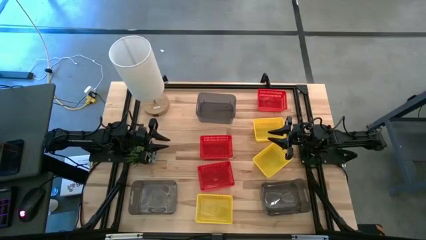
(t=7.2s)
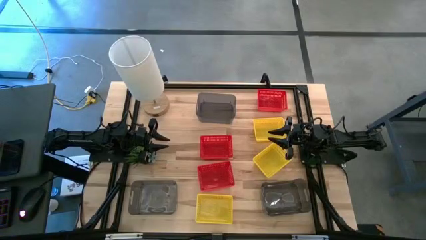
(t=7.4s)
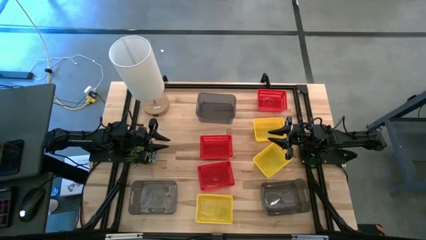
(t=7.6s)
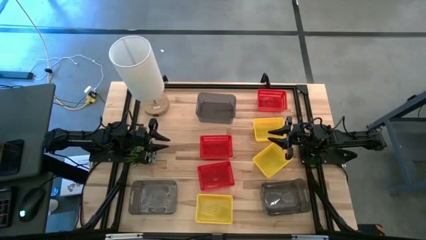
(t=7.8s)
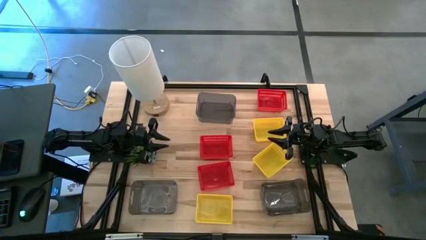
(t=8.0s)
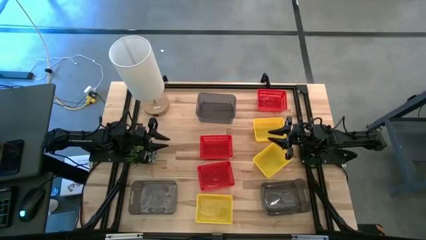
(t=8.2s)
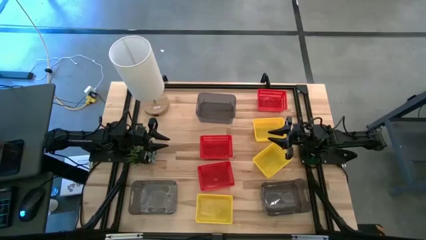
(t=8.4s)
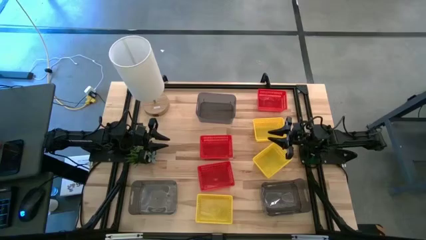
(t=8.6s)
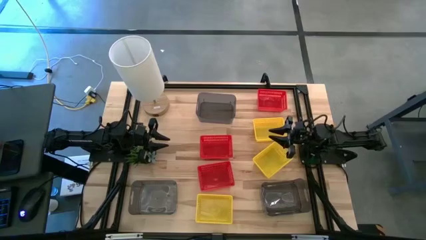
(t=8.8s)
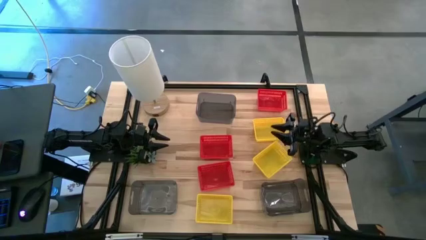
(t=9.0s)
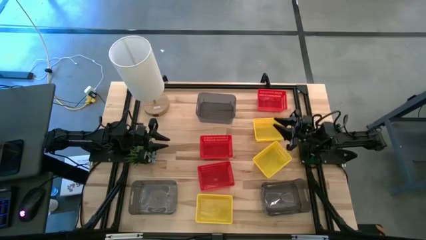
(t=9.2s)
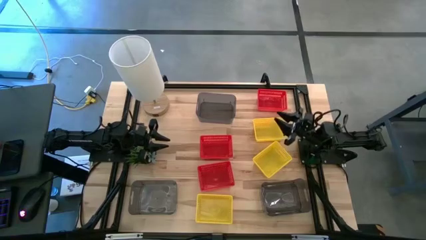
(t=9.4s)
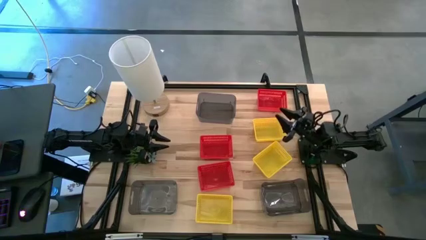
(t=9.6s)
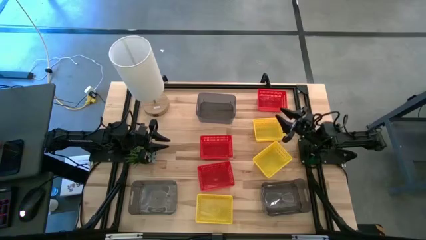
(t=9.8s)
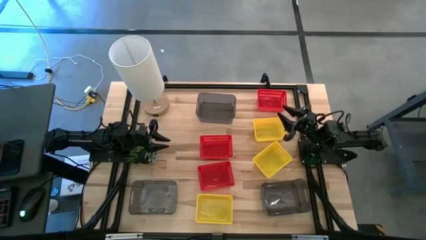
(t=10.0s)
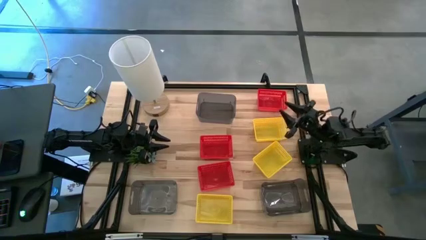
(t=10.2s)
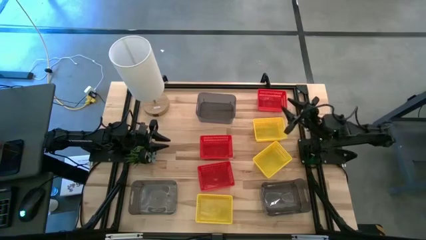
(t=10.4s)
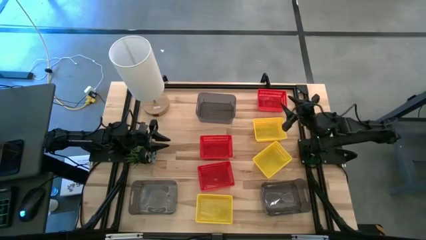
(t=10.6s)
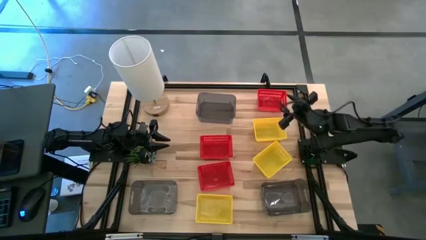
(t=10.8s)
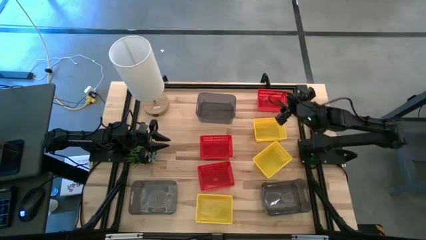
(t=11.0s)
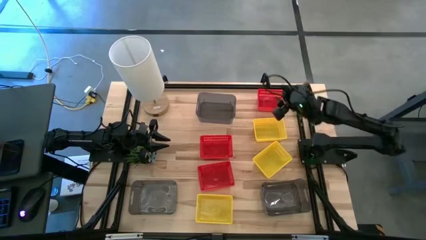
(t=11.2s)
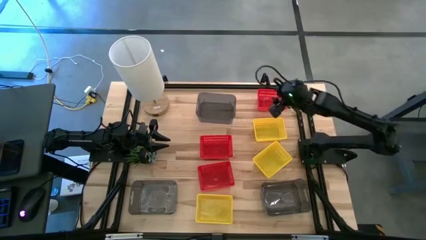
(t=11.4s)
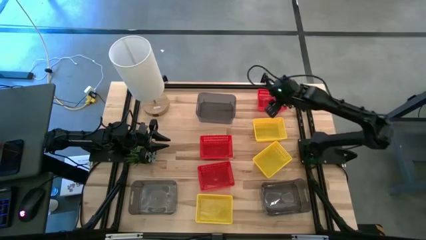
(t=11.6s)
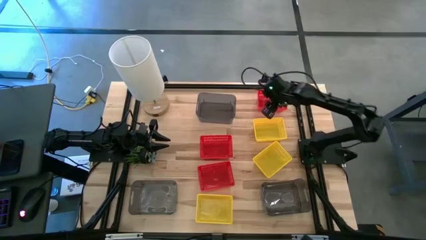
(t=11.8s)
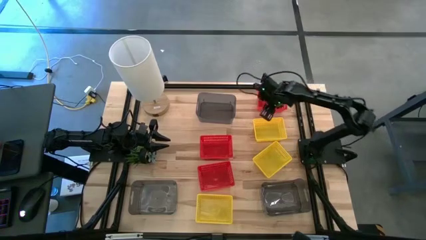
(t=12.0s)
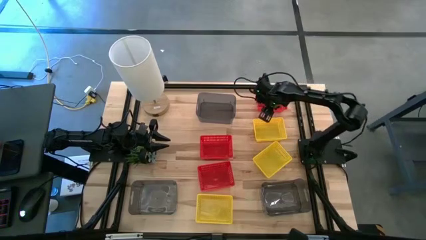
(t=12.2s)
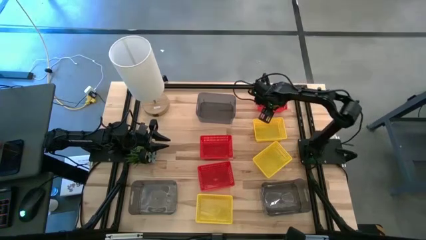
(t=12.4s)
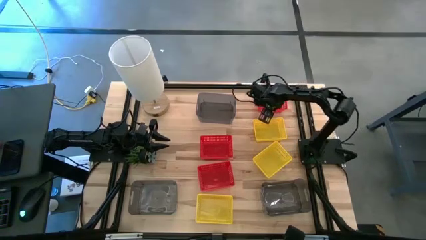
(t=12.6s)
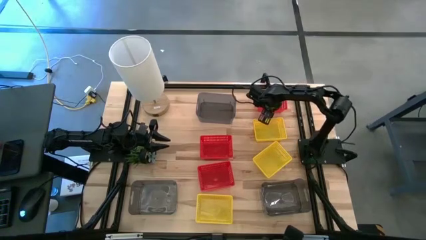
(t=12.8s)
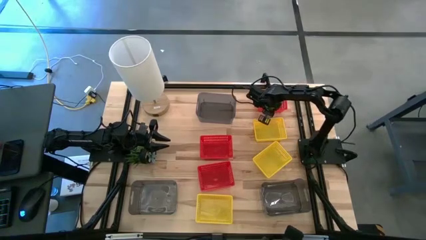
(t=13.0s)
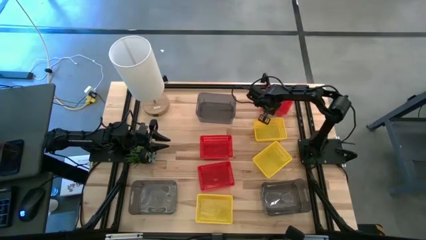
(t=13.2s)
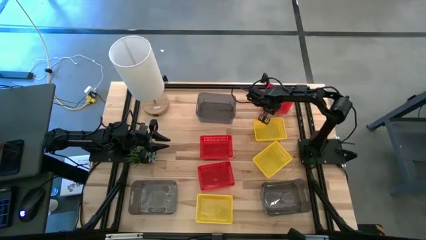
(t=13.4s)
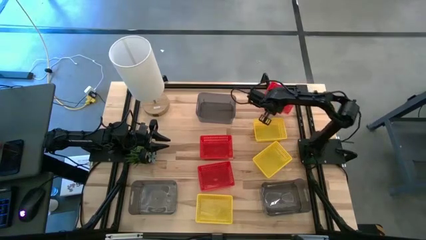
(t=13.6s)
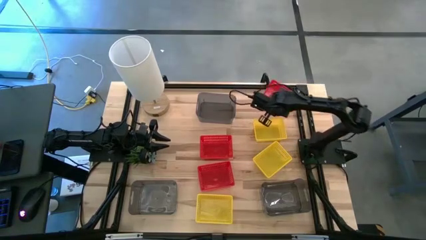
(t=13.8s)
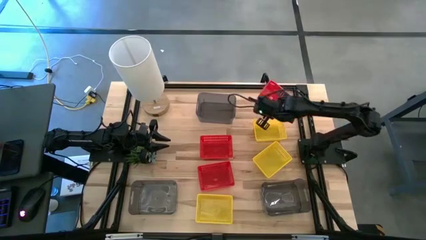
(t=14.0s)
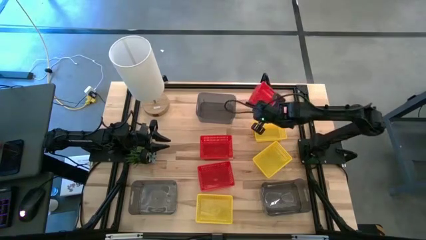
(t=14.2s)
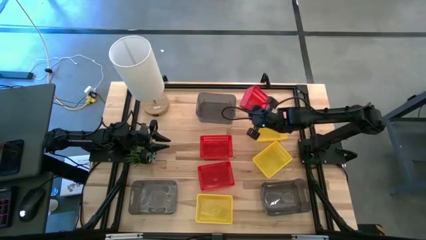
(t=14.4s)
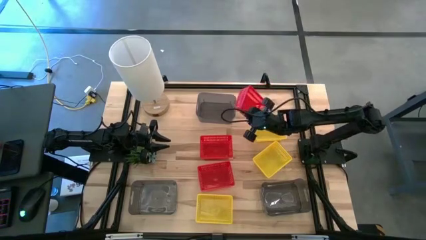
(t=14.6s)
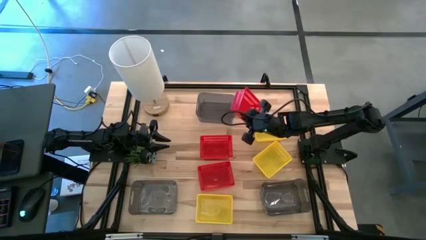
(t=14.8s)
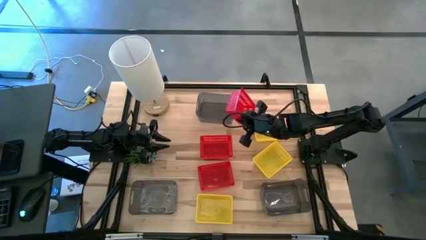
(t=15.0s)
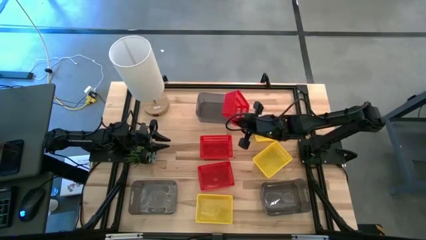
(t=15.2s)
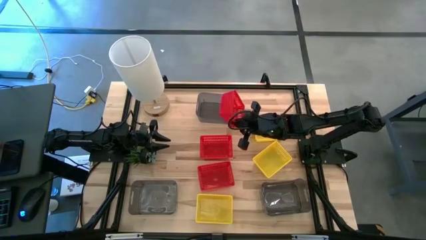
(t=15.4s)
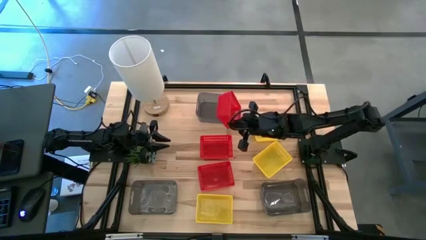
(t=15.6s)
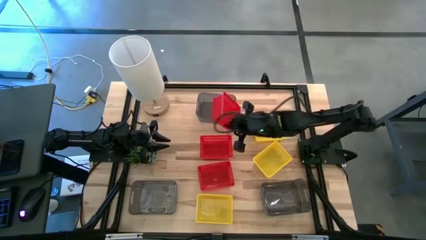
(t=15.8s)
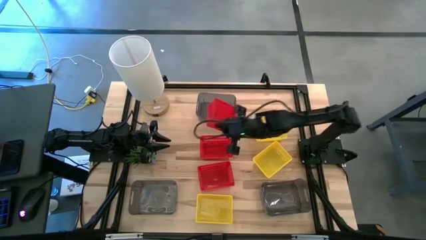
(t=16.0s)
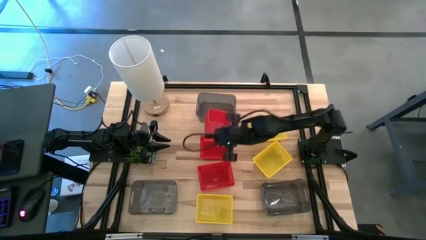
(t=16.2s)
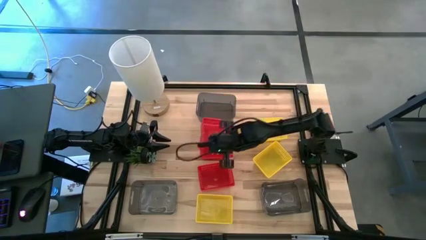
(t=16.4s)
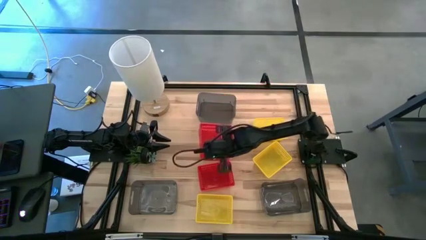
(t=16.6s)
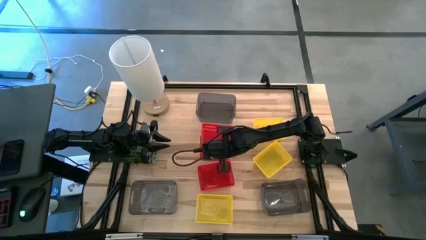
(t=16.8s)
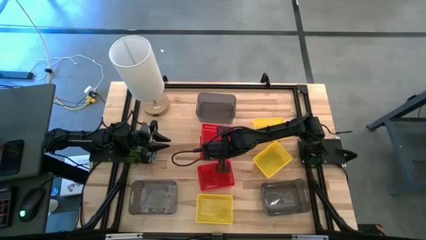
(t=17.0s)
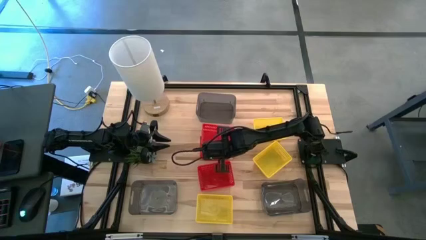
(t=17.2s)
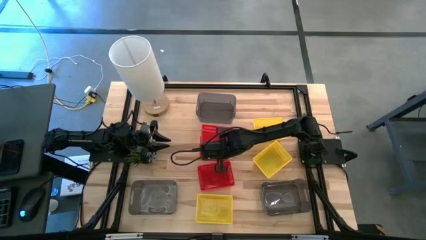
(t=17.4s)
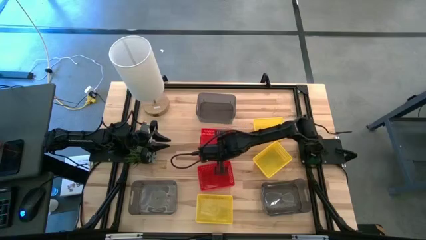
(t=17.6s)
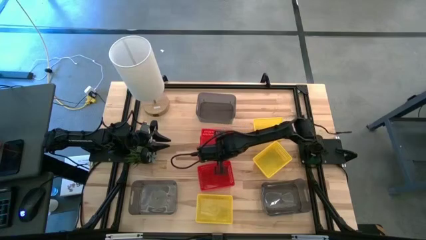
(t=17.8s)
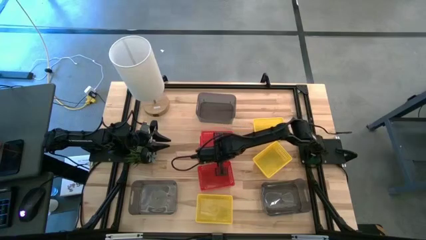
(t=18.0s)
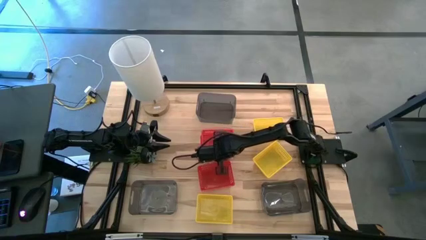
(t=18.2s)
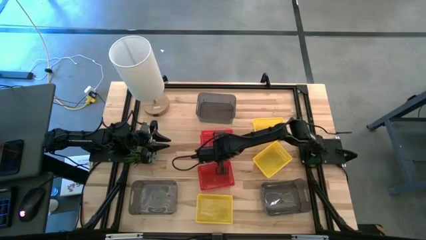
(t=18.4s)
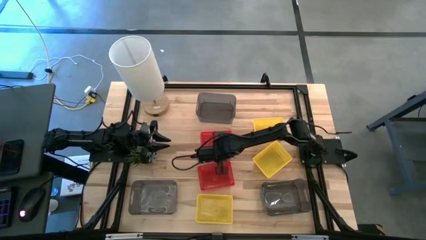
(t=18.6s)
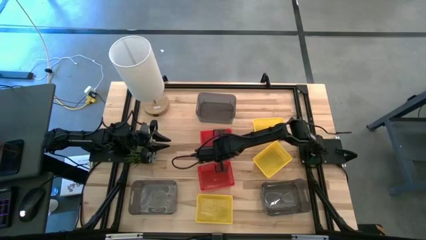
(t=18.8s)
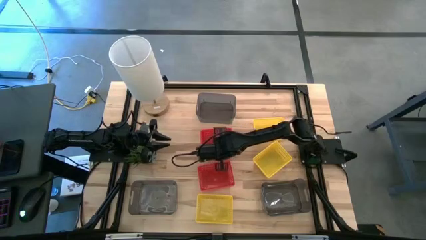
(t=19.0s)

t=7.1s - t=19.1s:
Stack the top red basket on the middle left red basket
